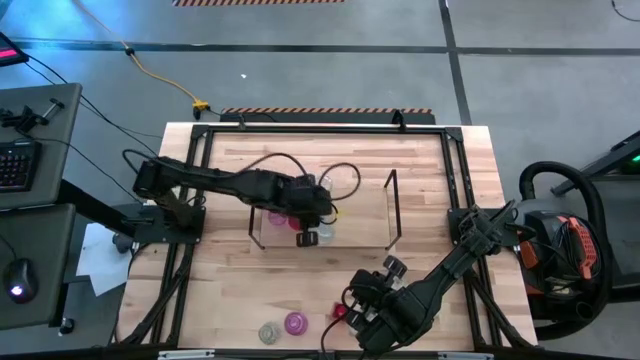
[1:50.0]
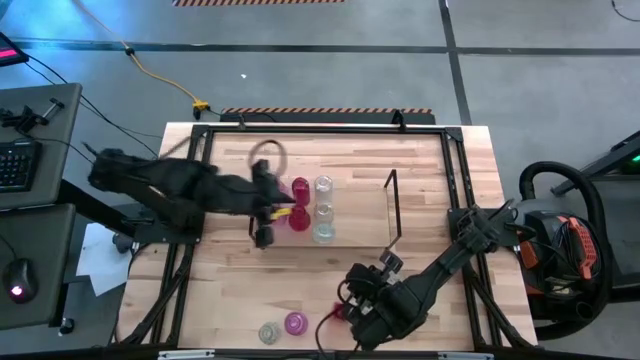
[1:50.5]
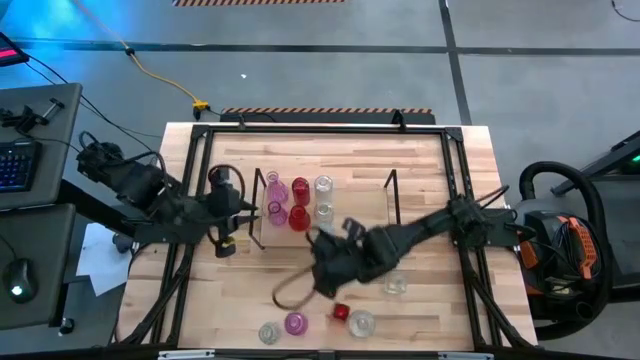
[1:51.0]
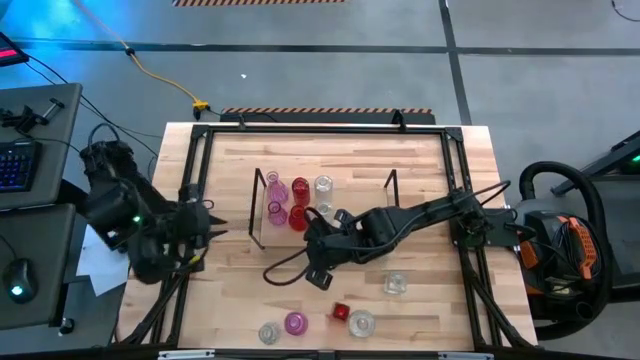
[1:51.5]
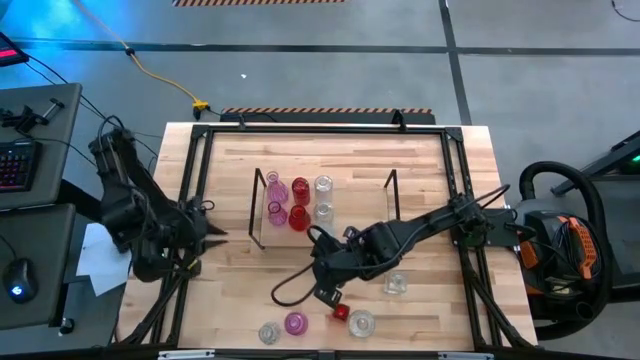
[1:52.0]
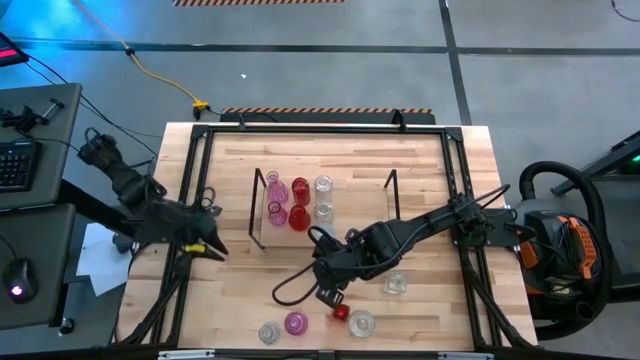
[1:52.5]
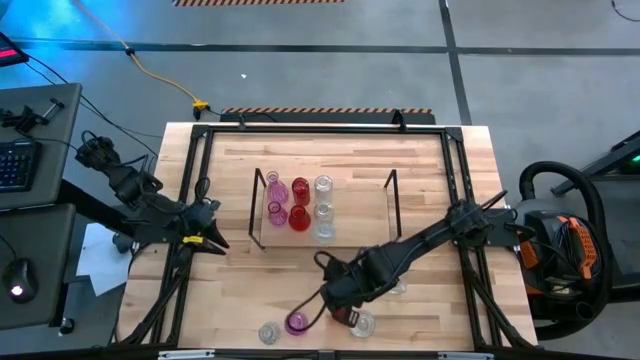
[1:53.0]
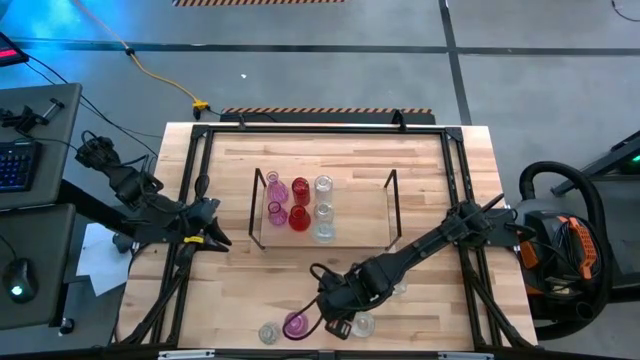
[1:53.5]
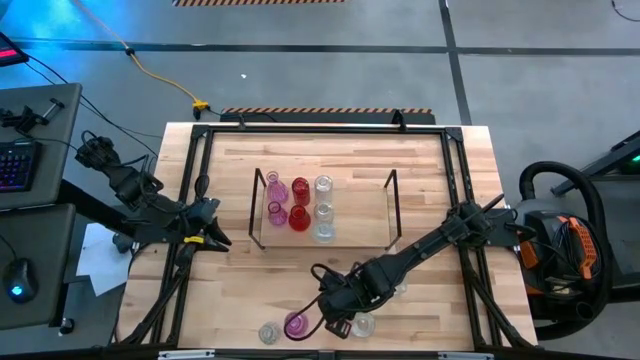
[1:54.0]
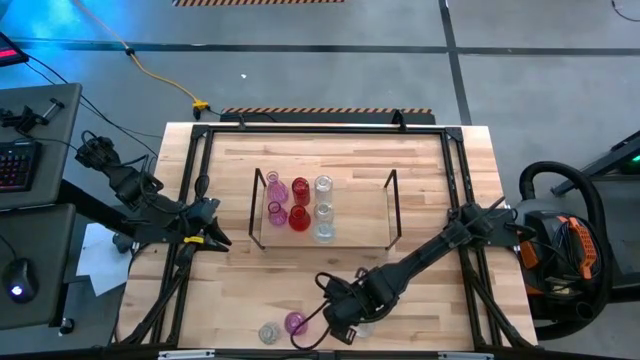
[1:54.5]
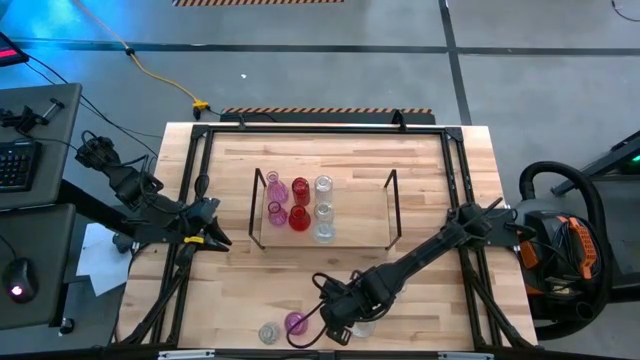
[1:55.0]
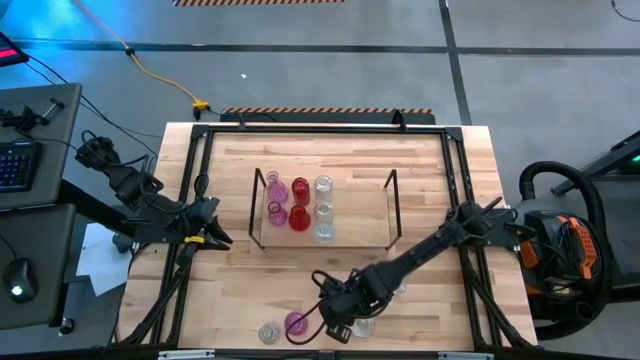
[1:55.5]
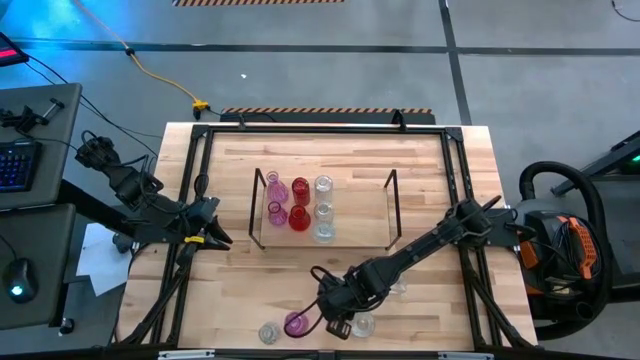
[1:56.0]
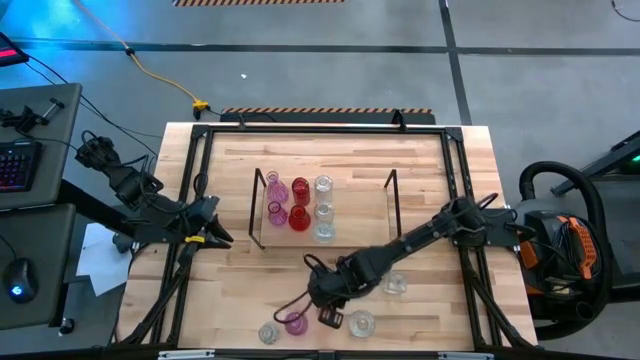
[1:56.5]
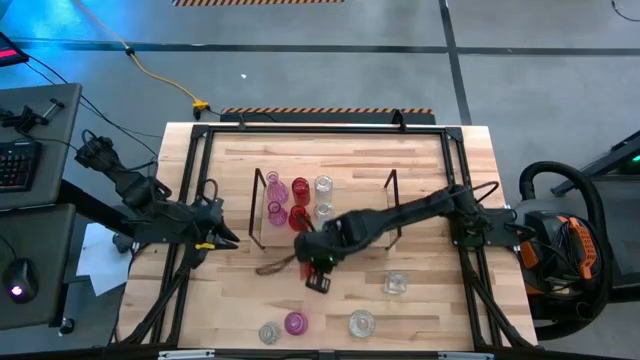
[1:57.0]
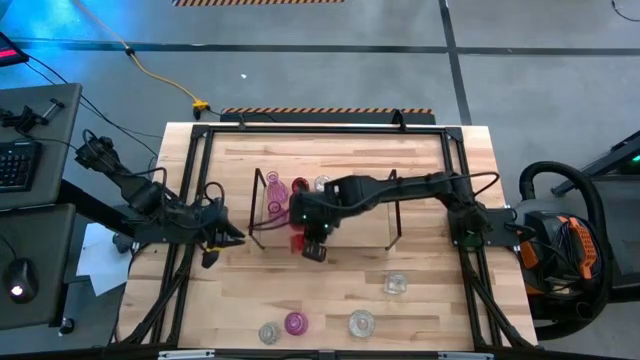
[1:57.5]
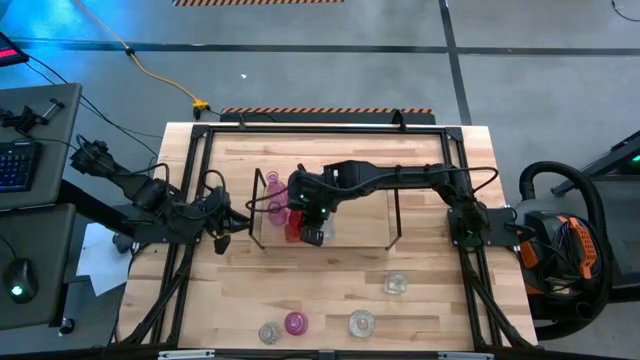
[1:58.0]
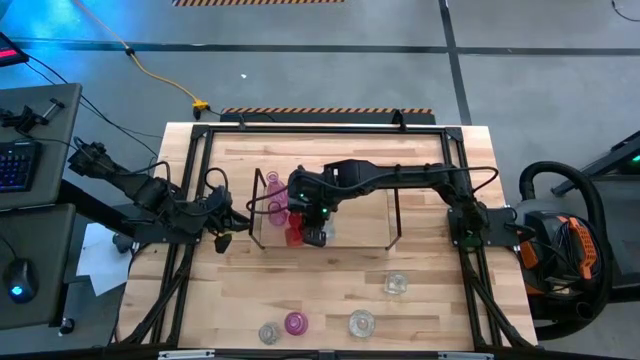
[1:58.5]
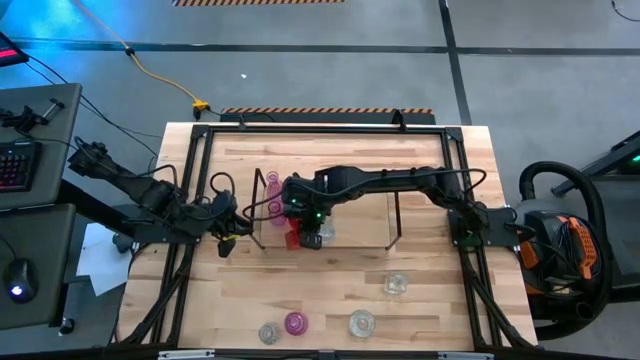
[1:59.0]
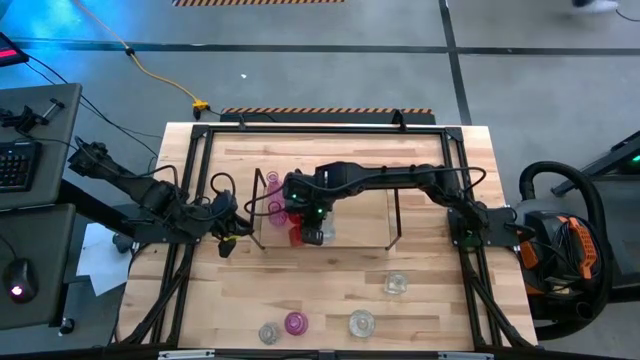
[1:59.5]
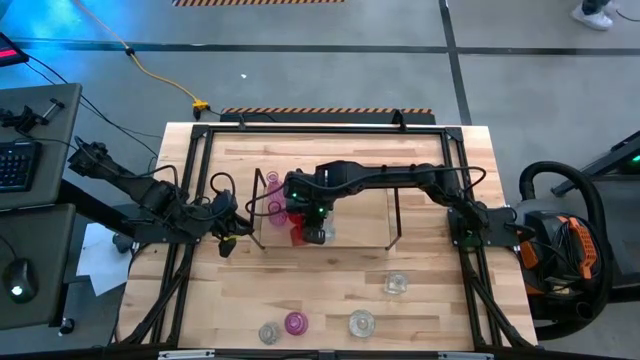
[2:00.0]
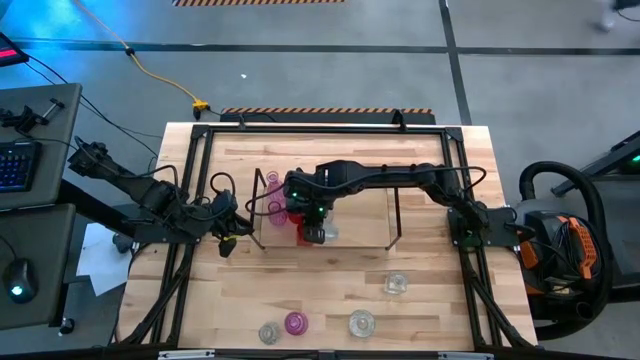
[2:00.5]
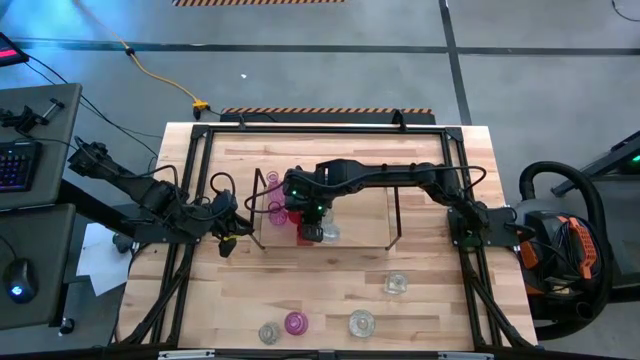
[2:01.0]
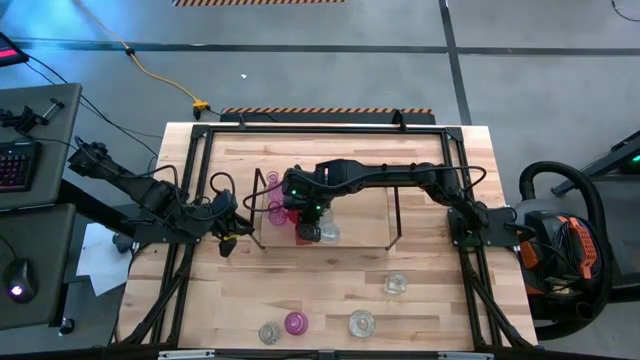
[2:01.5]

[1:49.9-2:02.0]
Task: sort vases onto shelf
Put the red vase aligned with the other red vases on the shelf

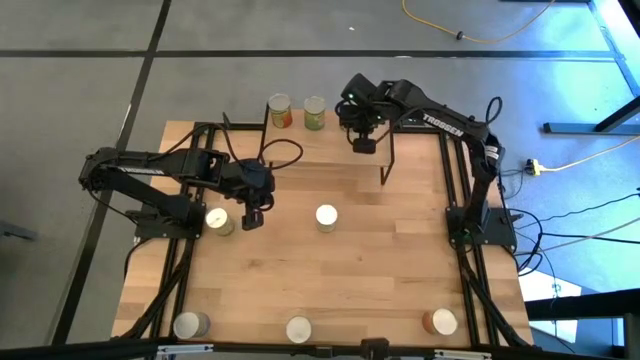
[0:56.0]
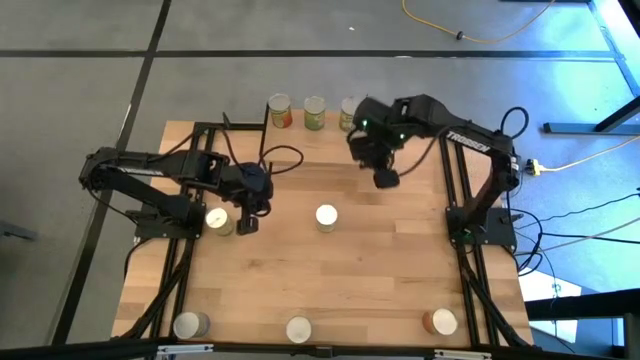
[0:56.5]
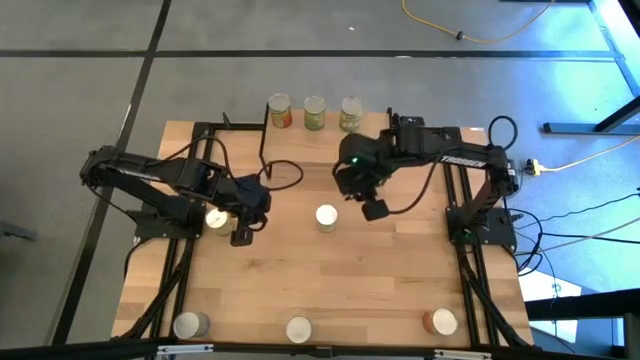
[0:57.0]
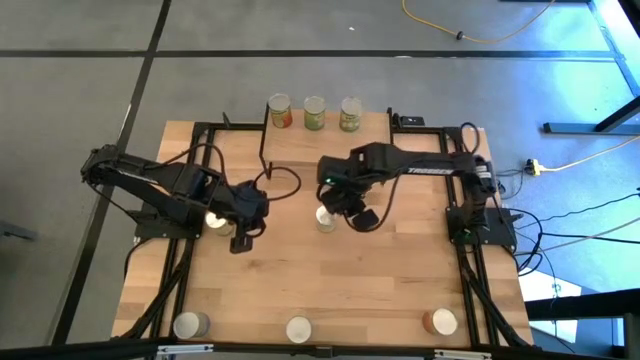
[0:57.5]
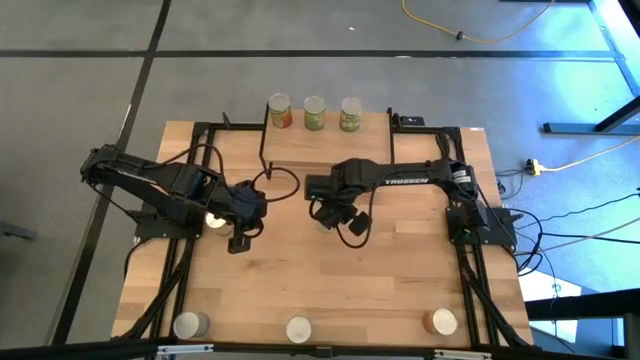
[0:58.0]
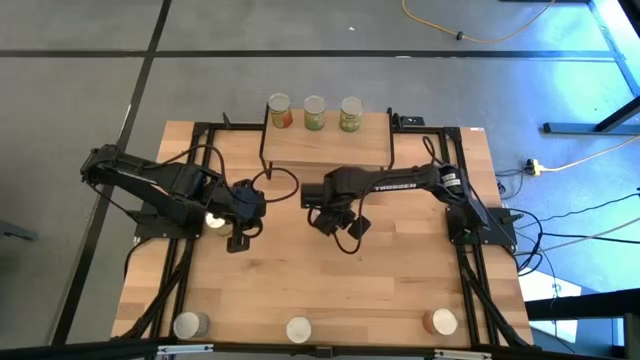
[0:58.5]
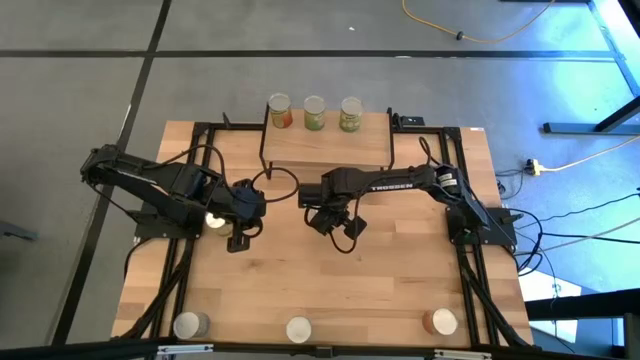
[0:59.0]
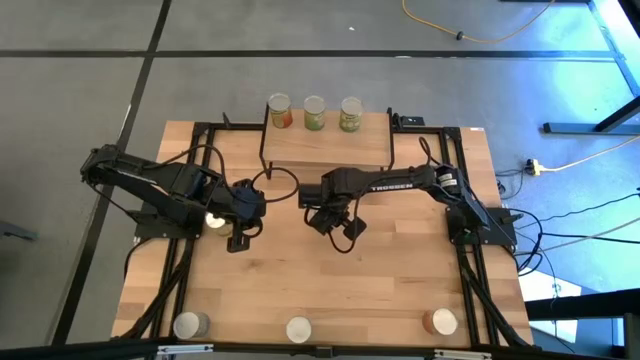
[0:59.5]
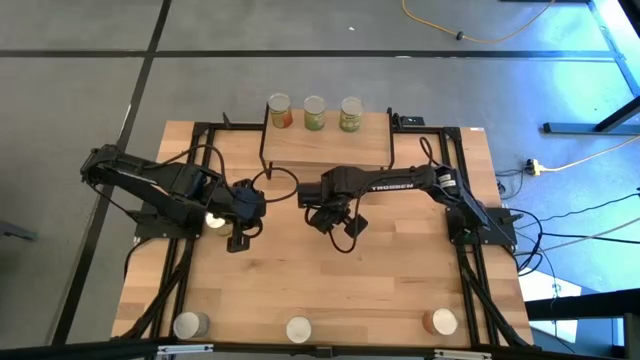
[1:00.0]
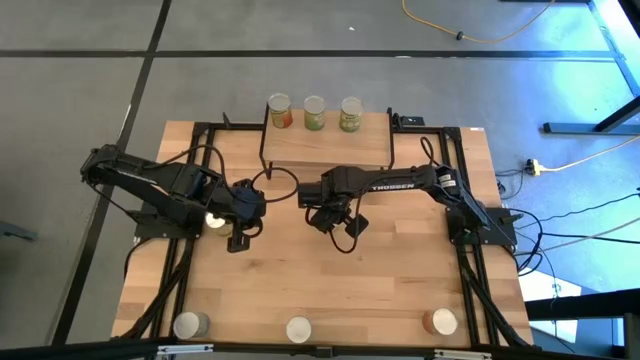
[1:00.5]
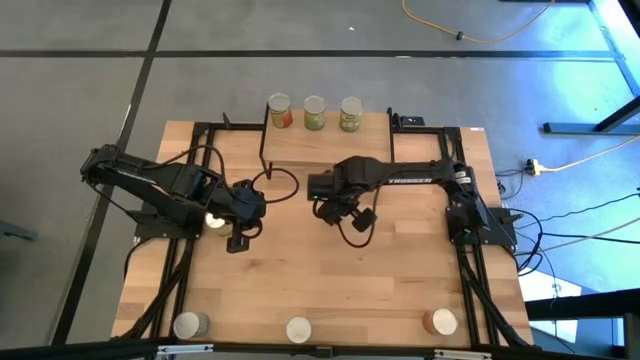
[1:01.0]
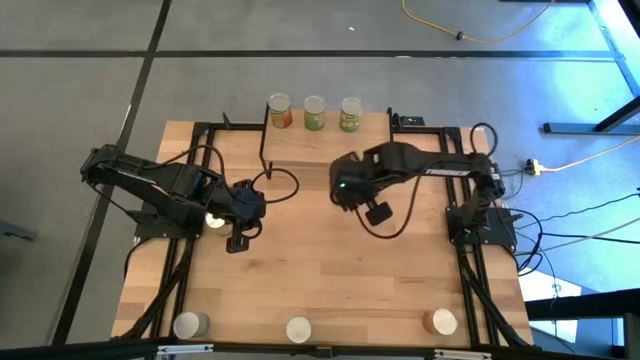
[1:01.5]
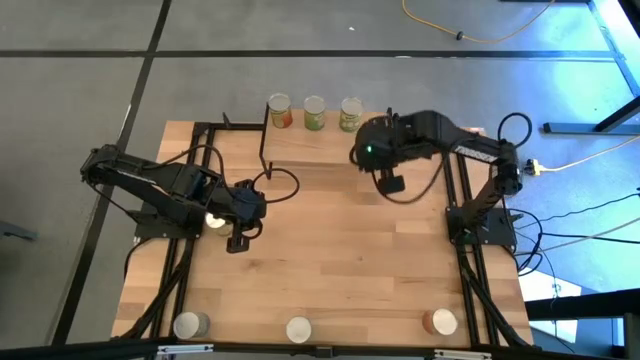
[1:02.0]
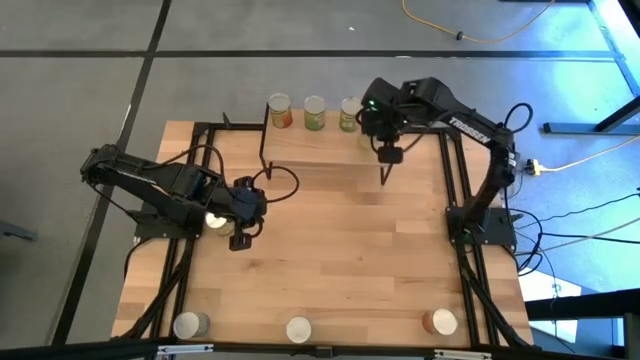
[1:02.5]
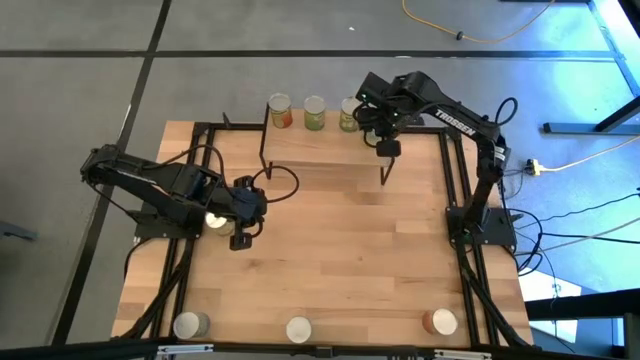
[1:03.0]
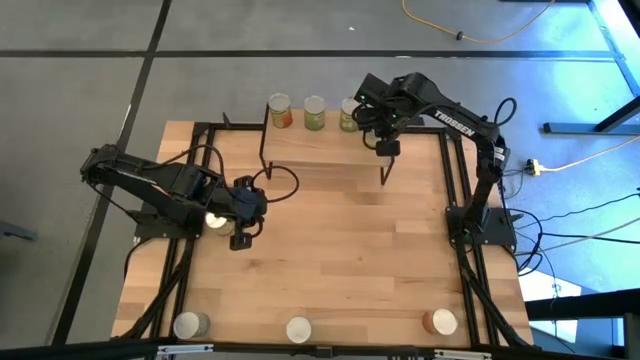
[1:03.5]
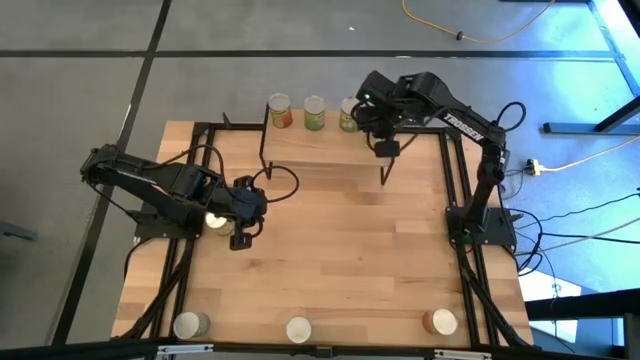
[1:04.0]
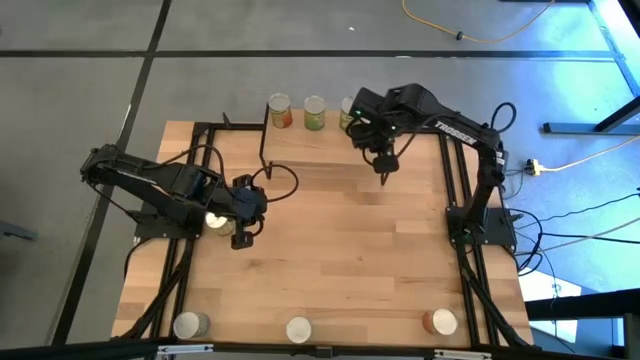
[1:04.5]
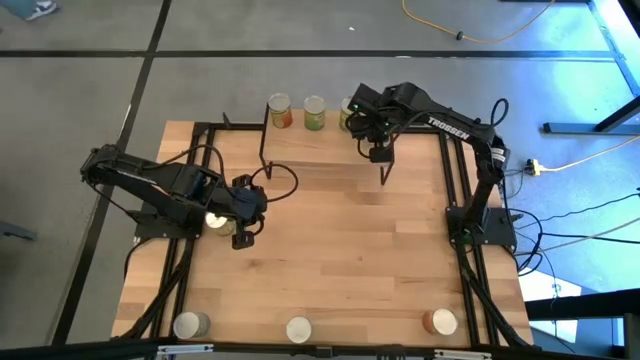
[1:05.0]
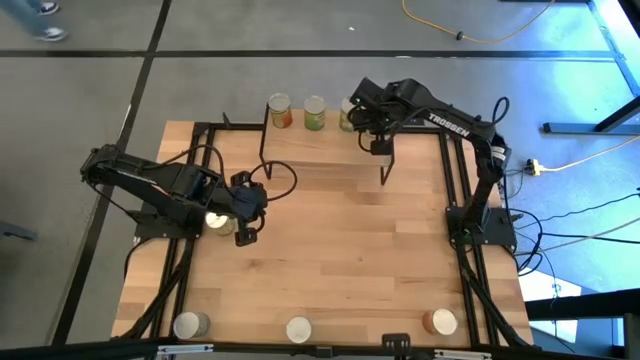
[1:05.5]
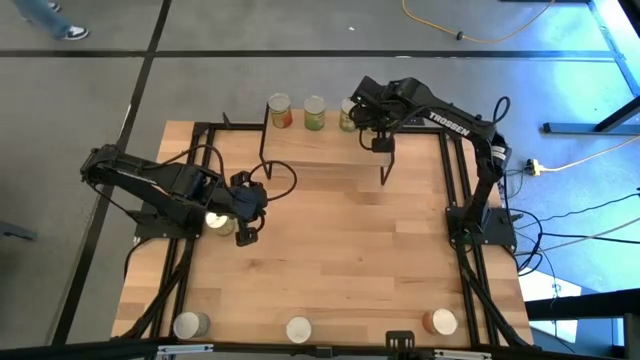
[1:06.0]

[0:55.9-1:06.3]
Task: Pick and place cans onto a shelf
Put the canned carrots on the shelf
